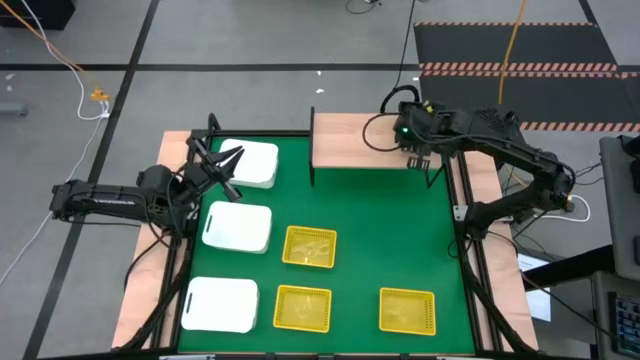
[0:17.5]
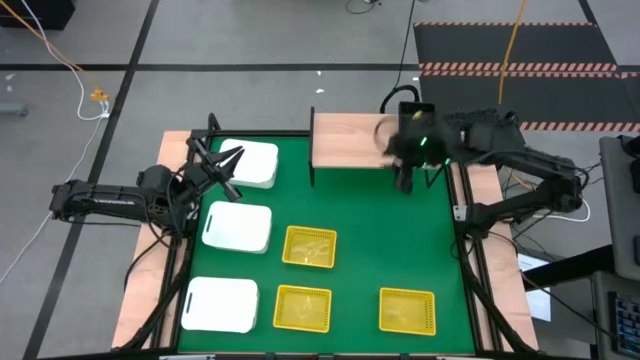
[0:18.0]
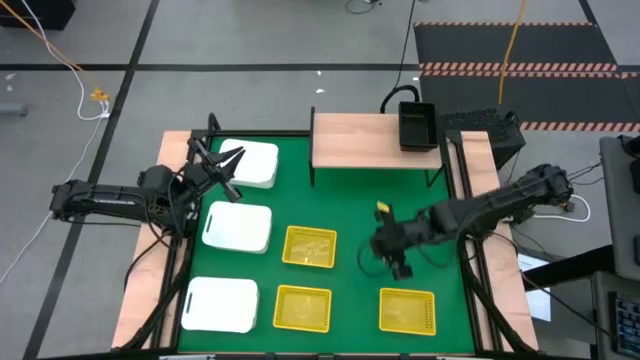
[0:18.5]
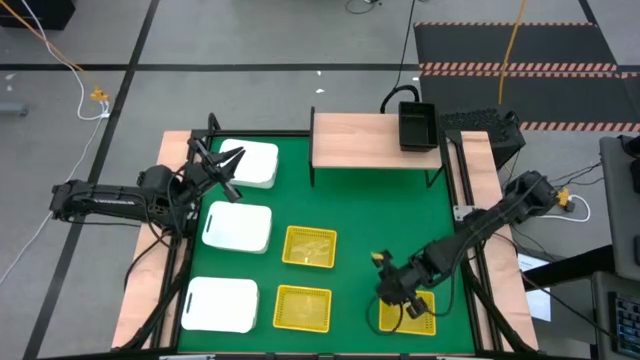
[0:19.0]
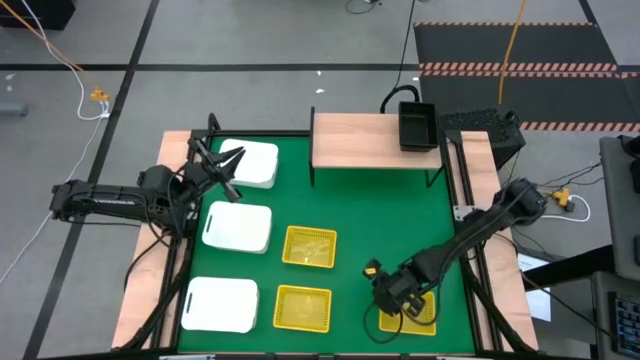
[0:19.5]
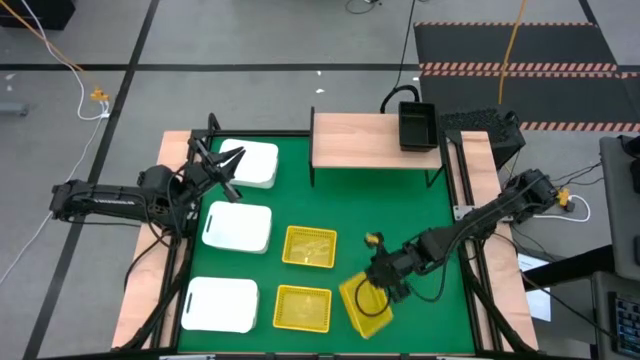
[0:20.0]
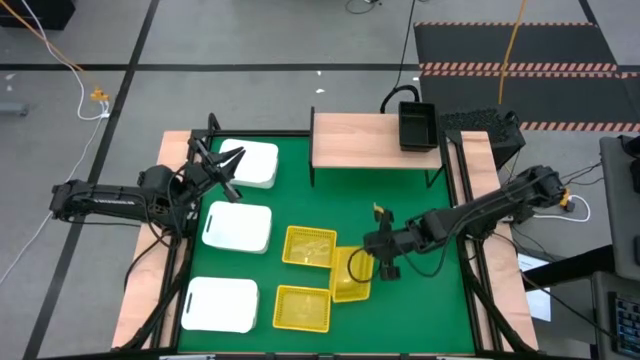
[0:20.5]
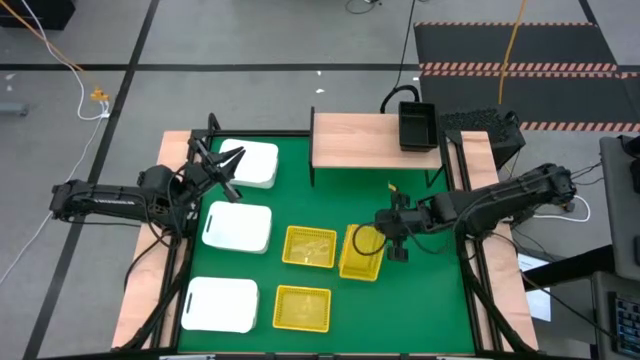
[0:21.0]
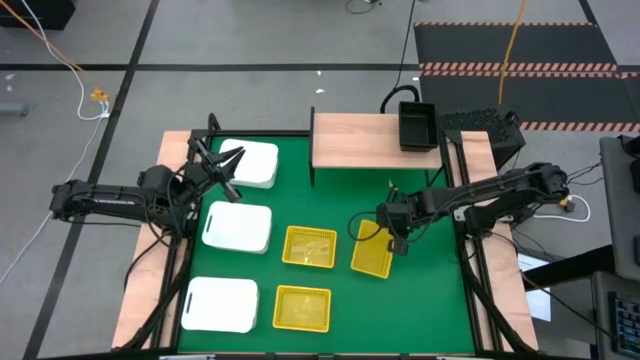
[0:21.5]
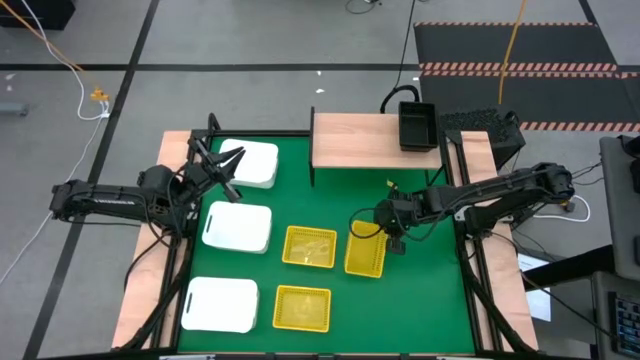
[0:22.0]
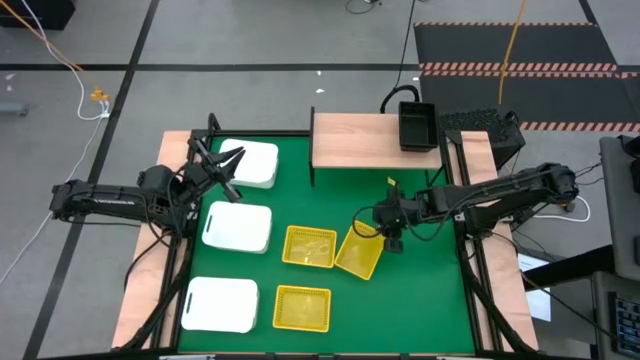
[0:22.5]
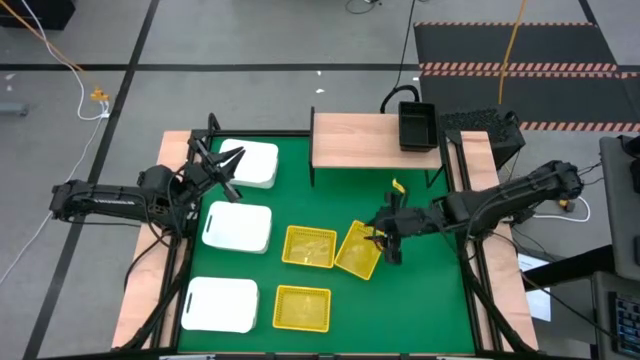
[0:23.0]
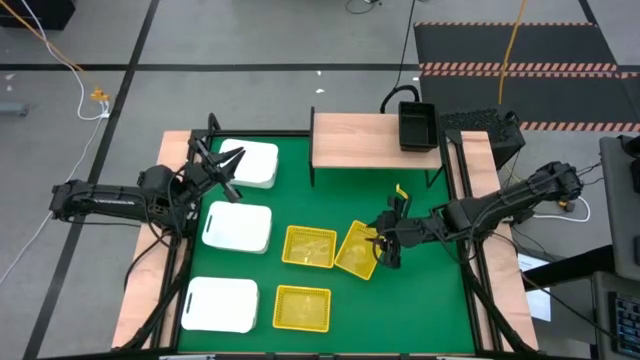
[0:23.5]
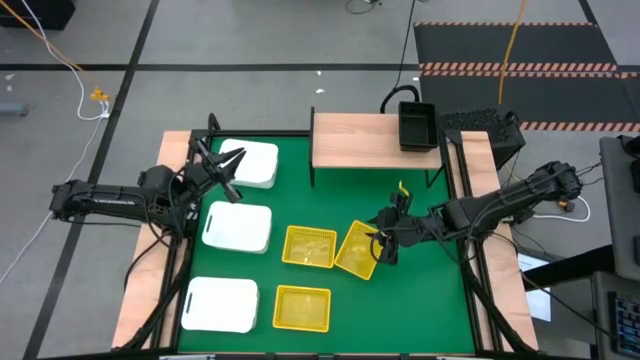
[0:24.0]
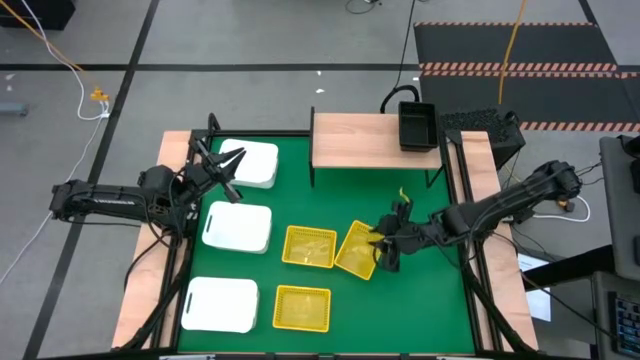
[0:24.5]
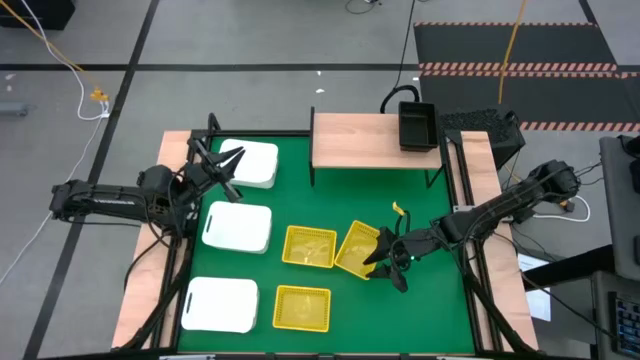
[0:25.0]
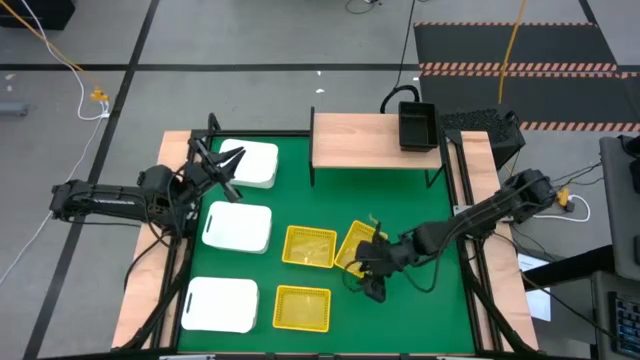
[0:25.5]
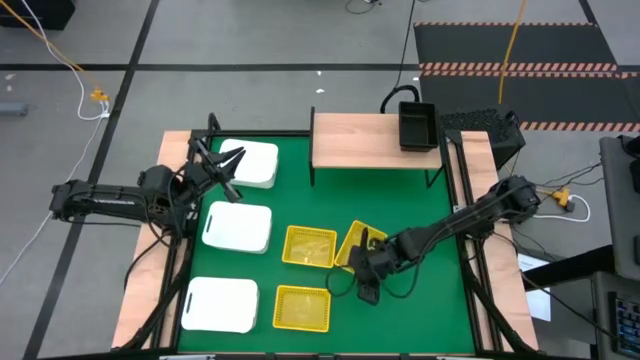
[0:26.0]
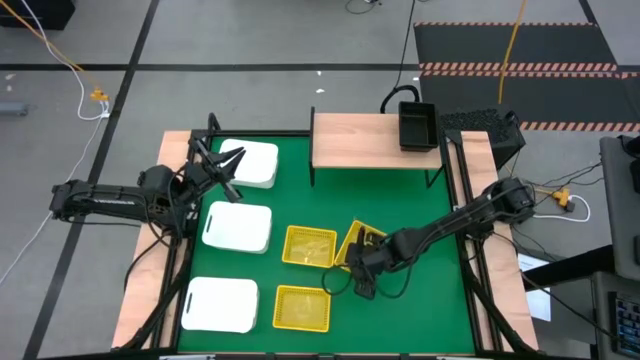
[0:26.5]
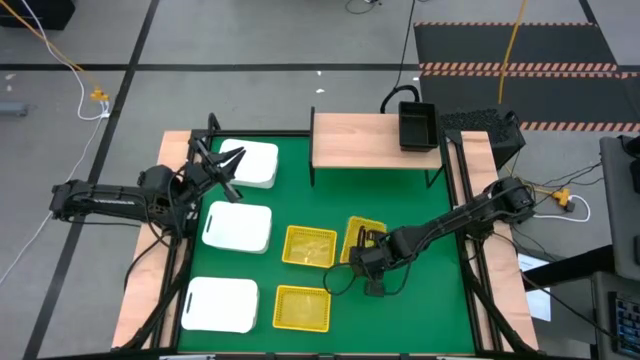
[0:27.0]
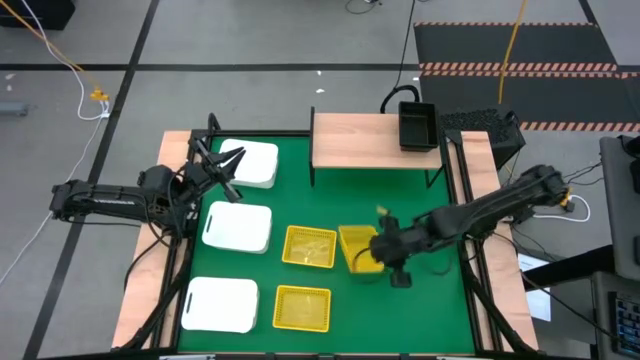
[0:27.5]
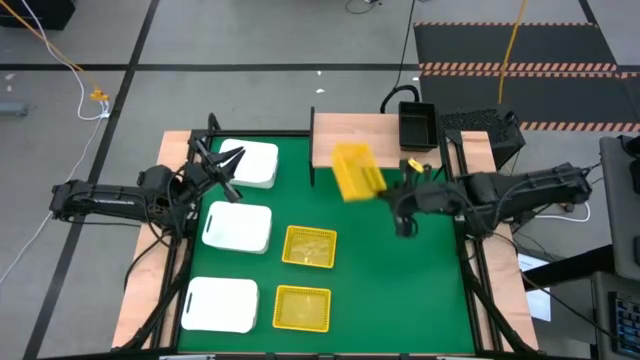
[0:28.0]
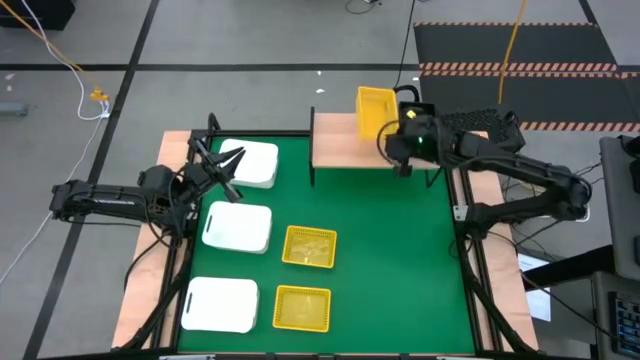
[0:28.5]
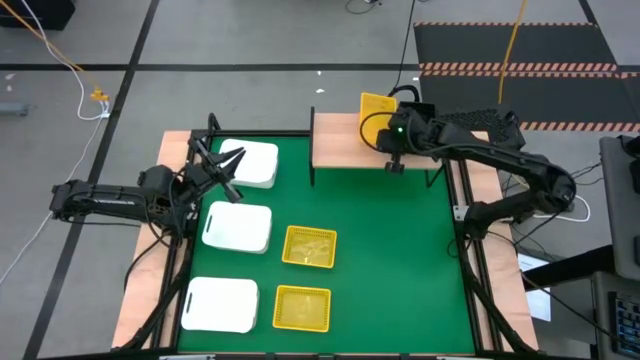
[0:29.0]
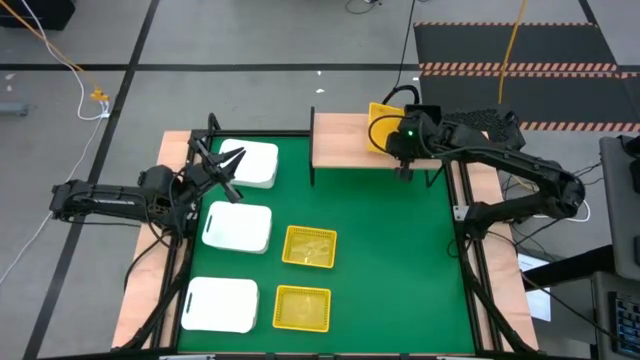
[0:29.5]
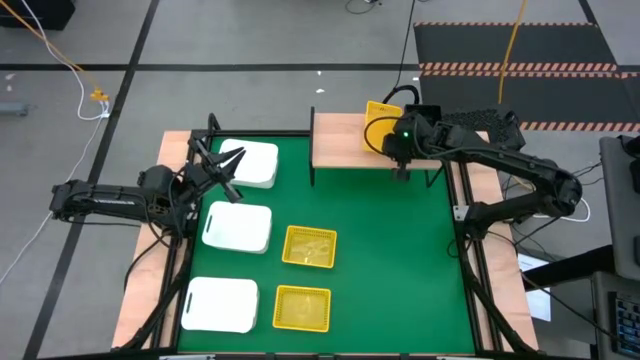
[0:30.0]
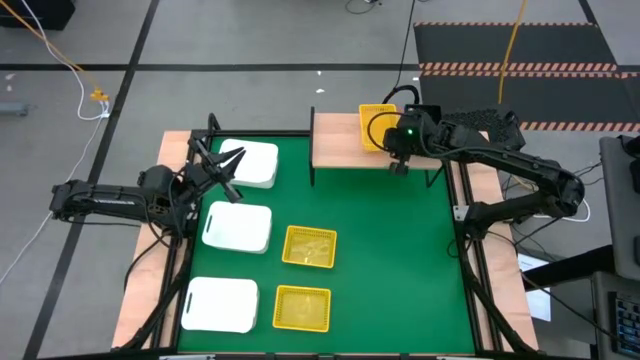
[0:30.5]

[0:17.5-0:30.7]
Task: Stack baskets on shelf by color
Put the bottom right yellow bin on the shelf

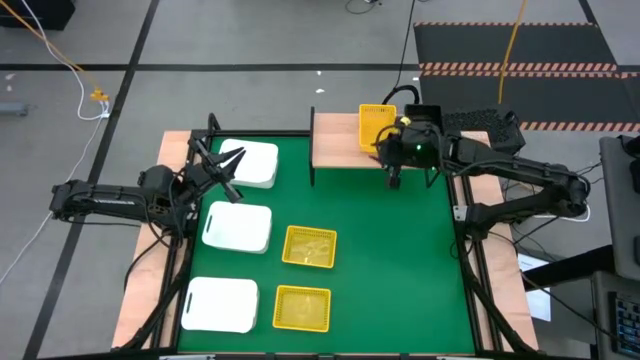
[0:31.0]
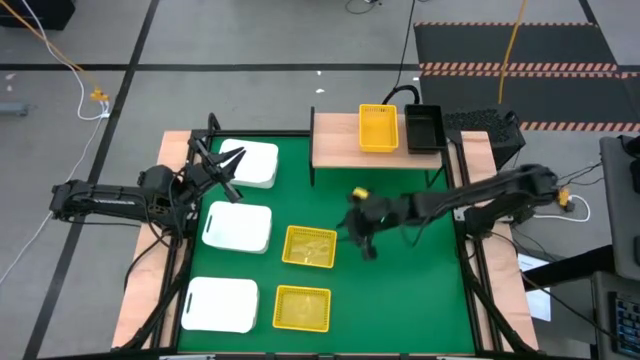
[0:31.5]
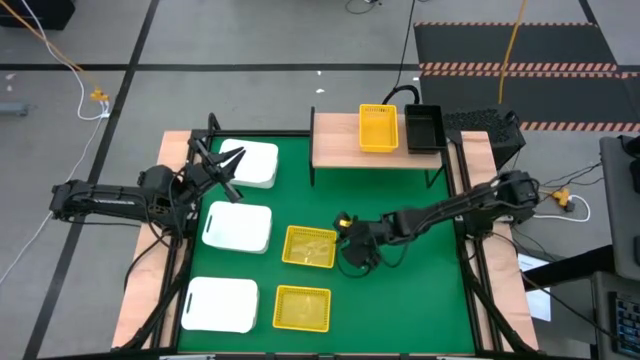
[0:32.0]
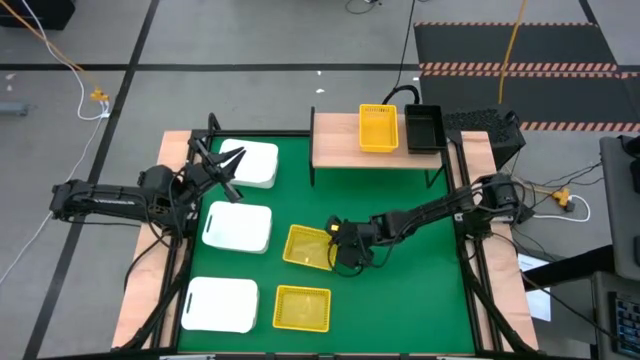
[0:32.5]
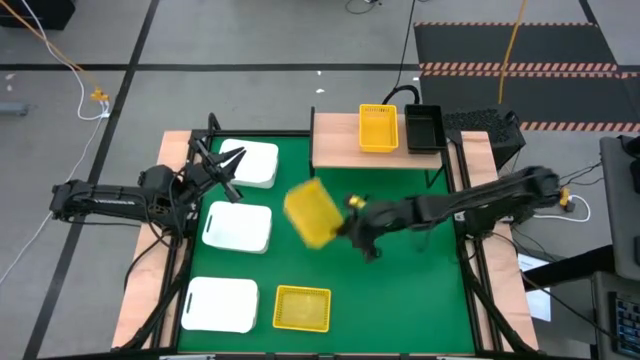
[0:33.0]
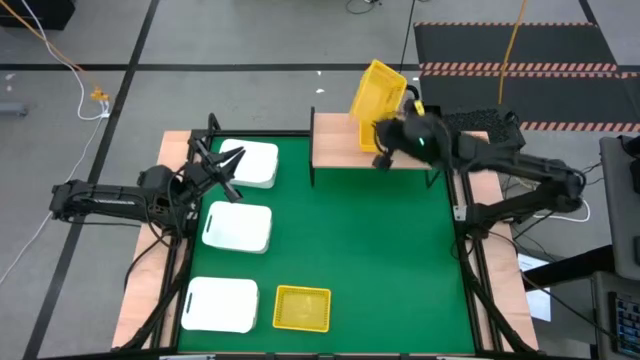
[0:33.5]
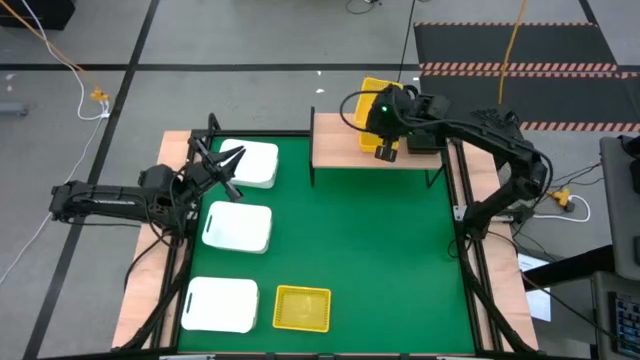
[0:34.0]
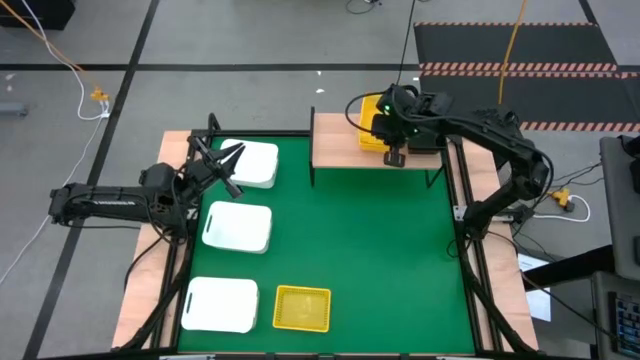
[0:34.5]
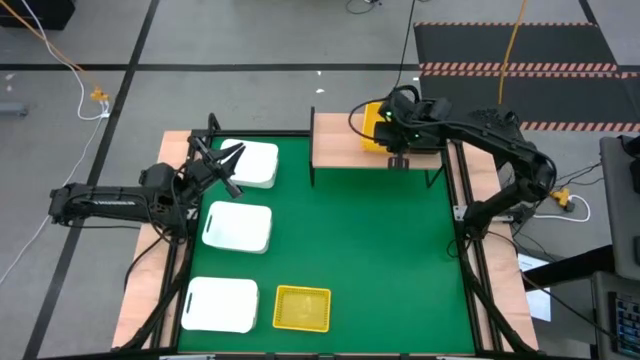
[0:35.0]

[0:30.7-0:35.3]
Stack the top yellow bin into the other yellow bin on the shelf

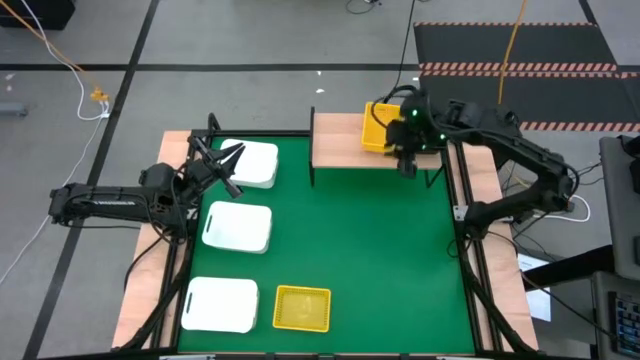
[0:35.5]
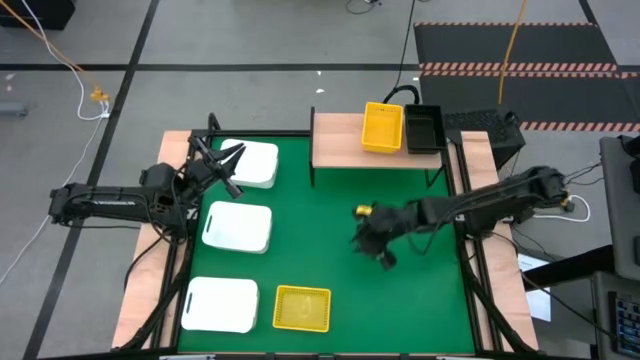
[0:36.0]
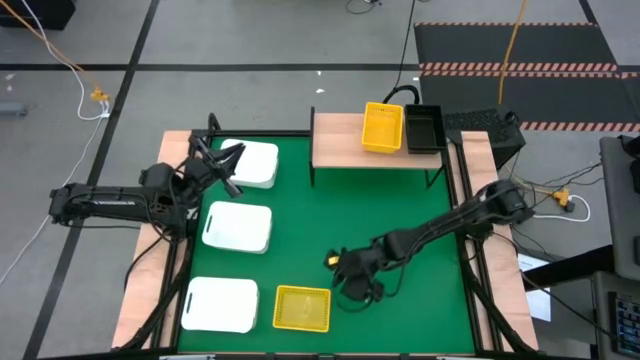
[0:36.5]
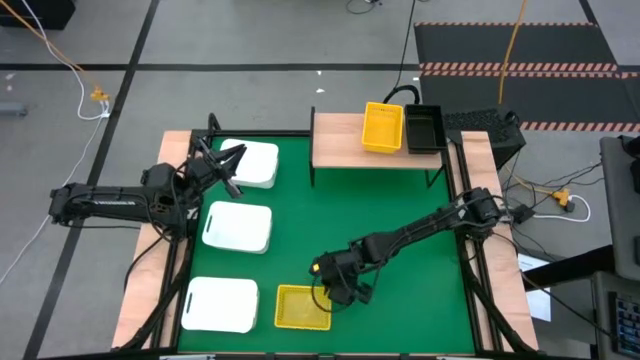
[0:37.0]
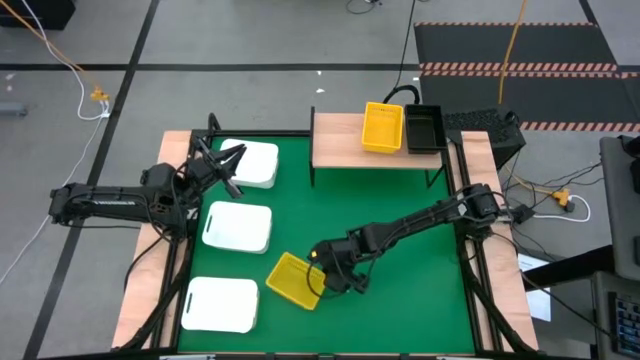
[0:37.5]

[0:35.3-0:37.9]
Stack the yellow bin into the stacked yellow bins on the shelf

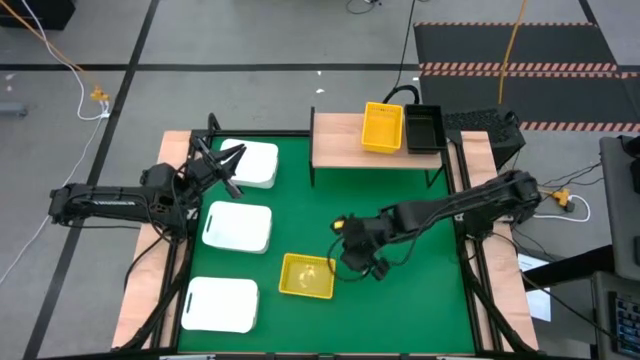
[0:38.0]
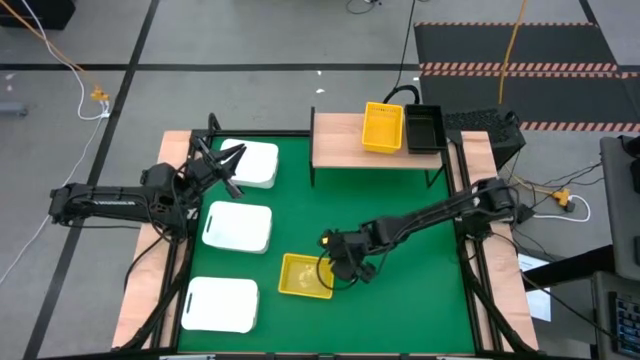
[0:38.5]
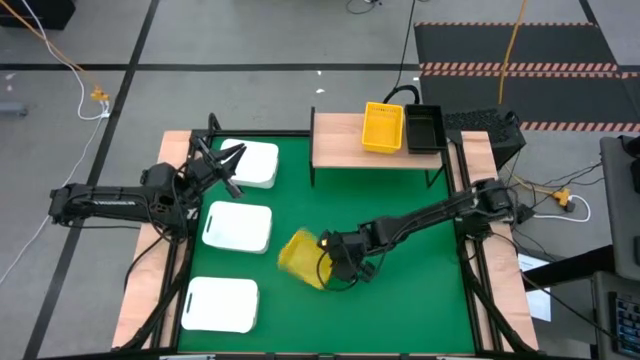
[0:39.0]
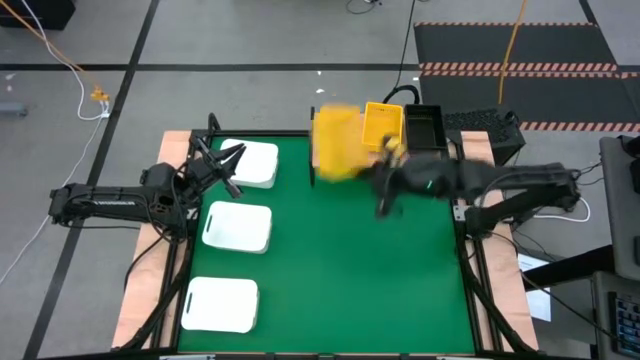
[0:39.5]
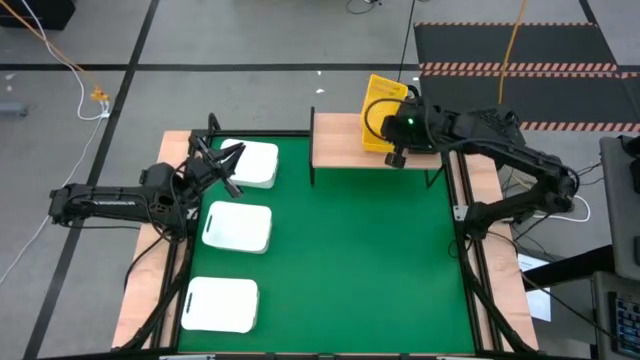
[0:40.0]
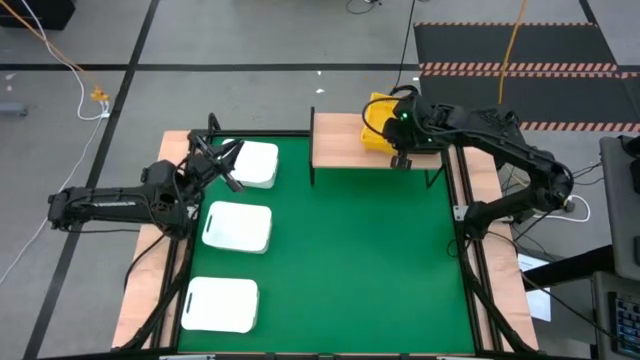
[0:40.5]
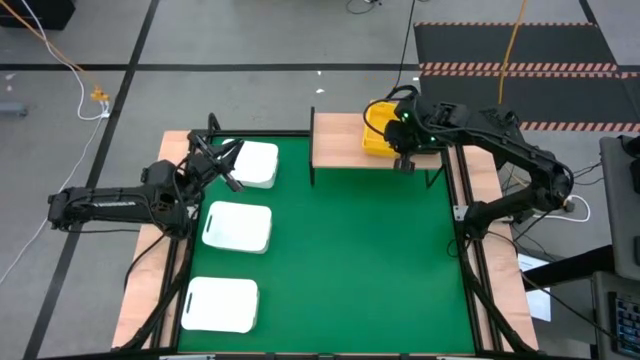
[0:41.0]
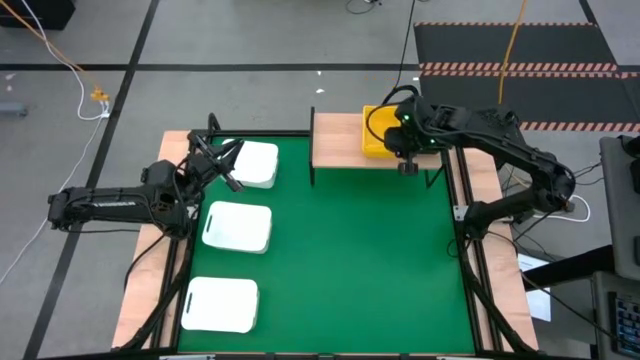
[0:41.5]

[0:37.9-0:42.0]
Stack the yellow bin into the stacked yellow bins on the shelf
